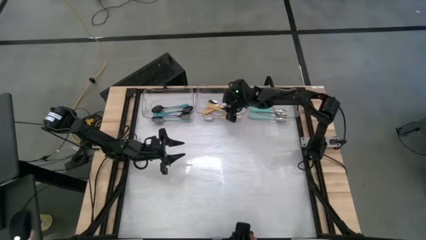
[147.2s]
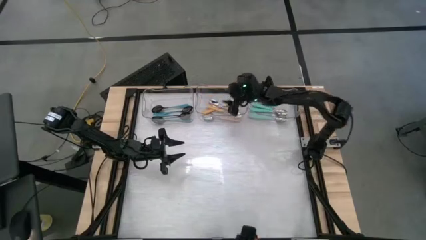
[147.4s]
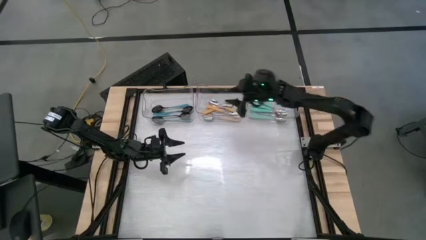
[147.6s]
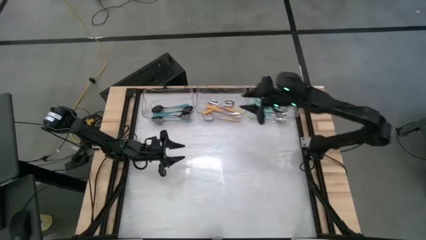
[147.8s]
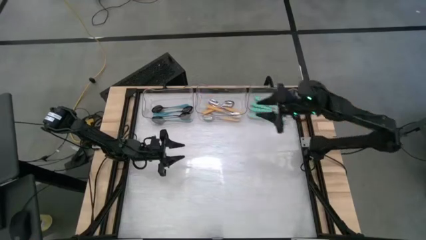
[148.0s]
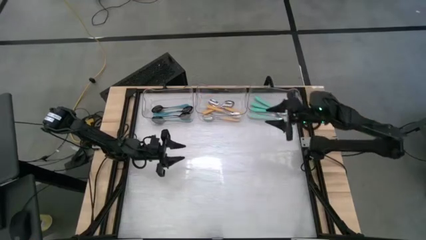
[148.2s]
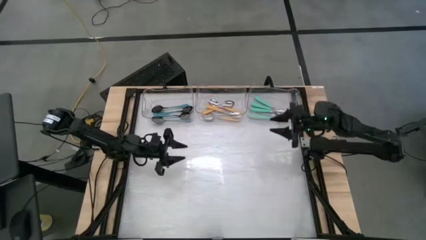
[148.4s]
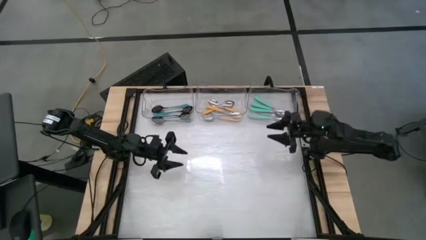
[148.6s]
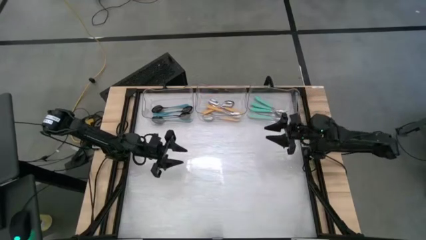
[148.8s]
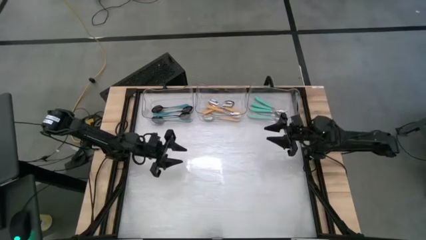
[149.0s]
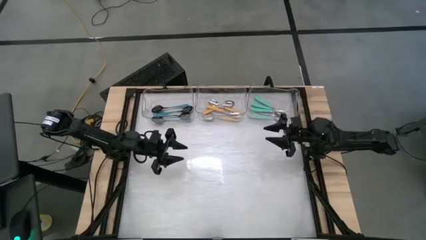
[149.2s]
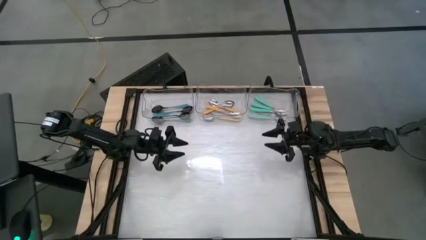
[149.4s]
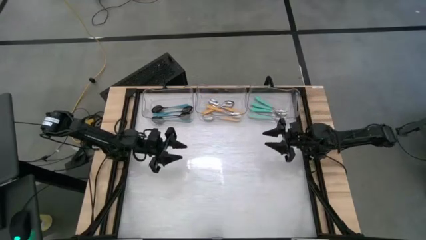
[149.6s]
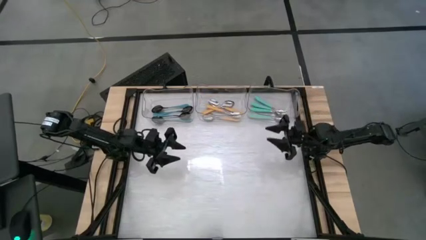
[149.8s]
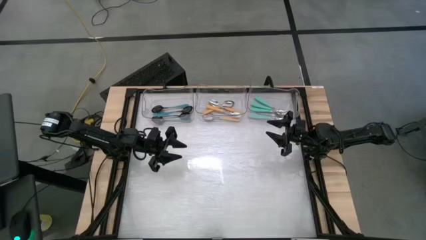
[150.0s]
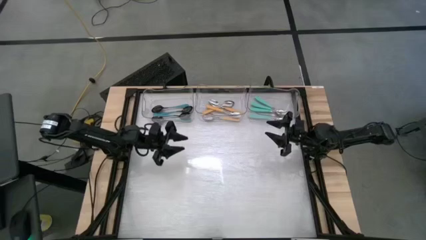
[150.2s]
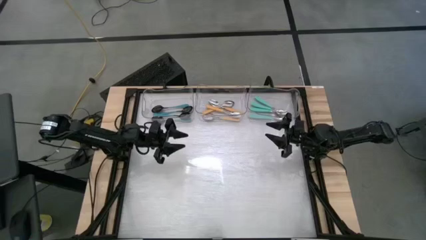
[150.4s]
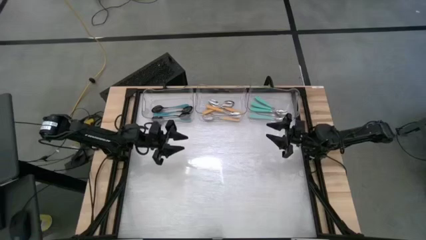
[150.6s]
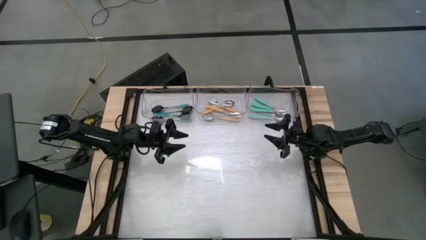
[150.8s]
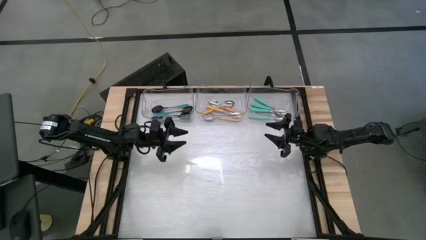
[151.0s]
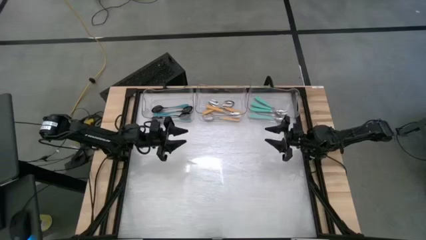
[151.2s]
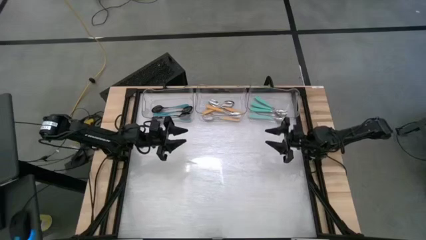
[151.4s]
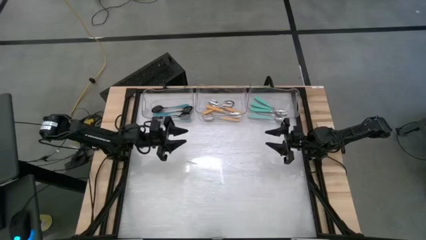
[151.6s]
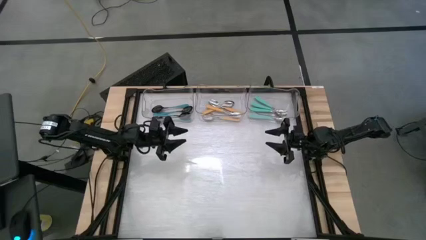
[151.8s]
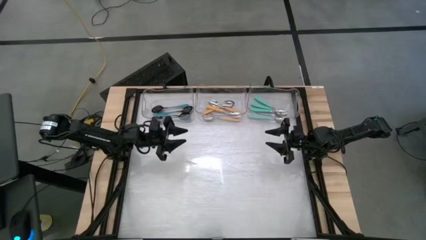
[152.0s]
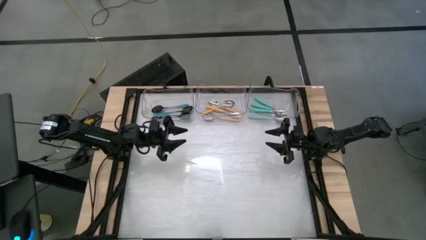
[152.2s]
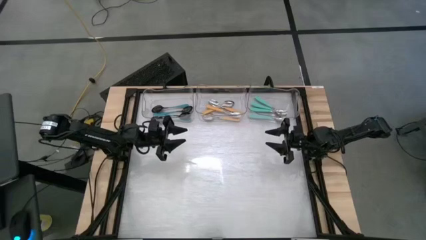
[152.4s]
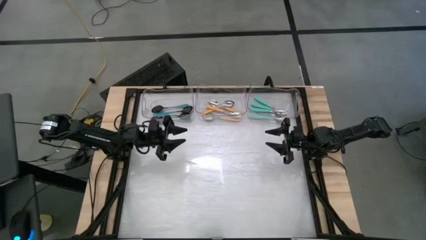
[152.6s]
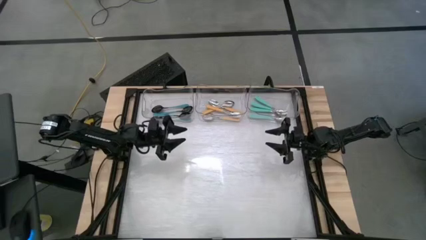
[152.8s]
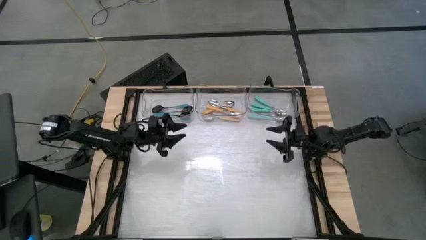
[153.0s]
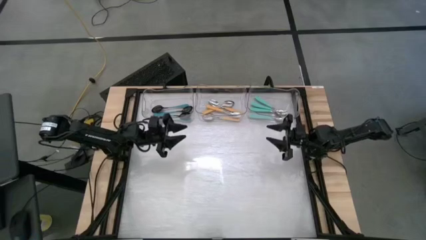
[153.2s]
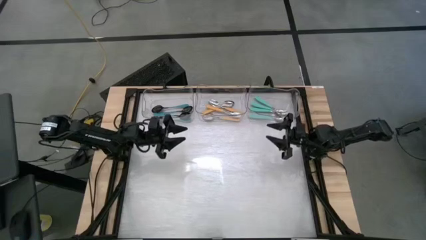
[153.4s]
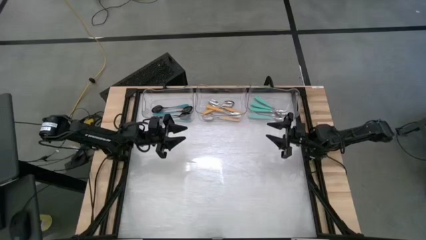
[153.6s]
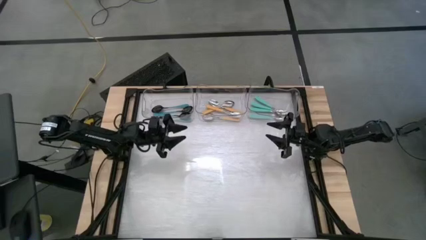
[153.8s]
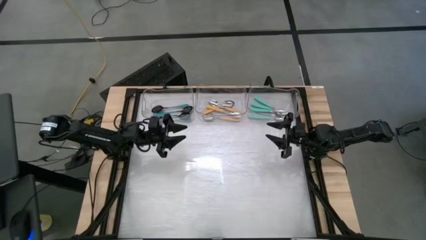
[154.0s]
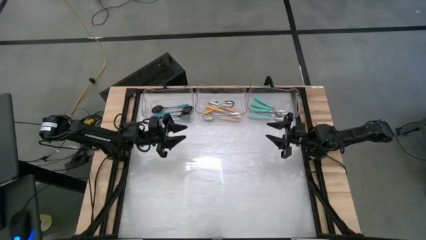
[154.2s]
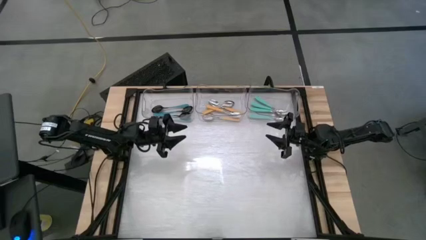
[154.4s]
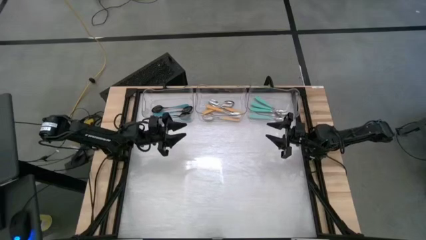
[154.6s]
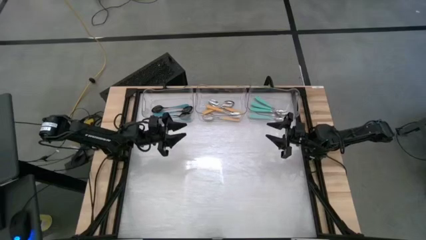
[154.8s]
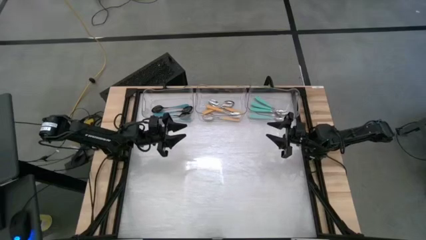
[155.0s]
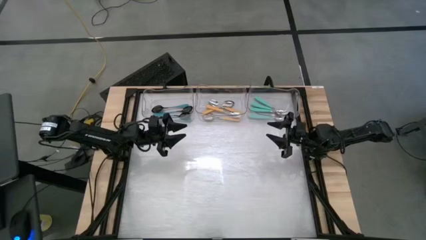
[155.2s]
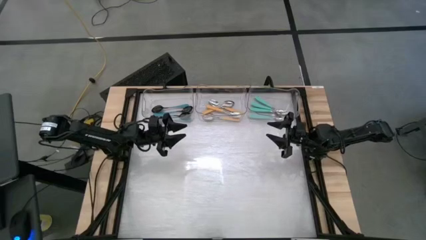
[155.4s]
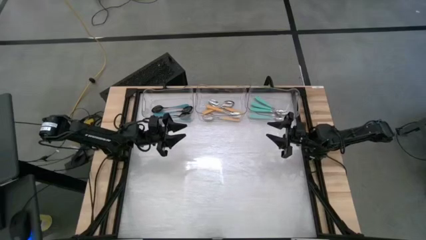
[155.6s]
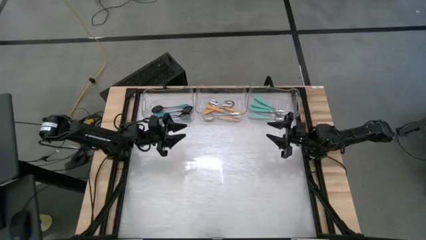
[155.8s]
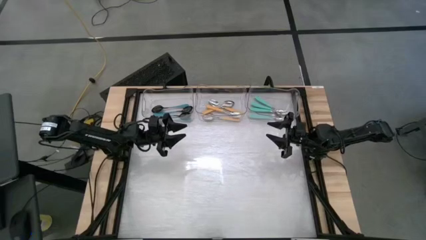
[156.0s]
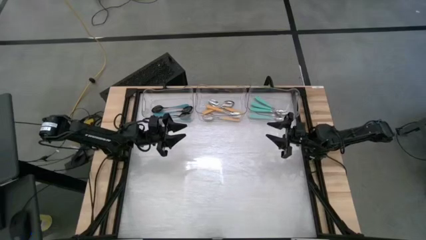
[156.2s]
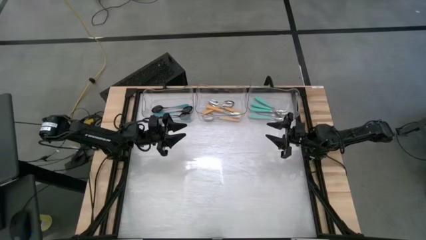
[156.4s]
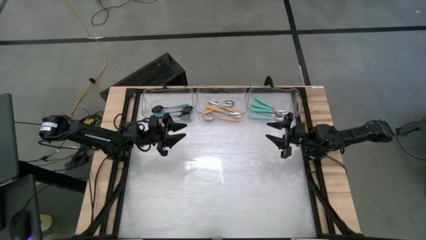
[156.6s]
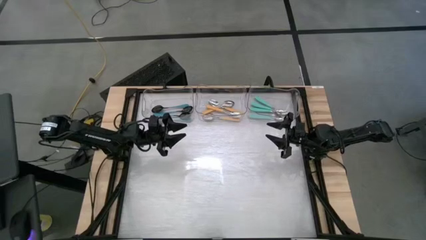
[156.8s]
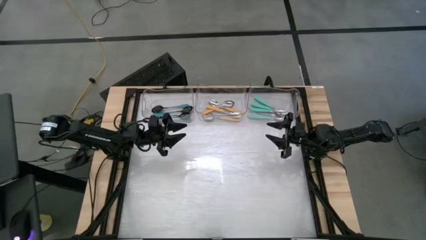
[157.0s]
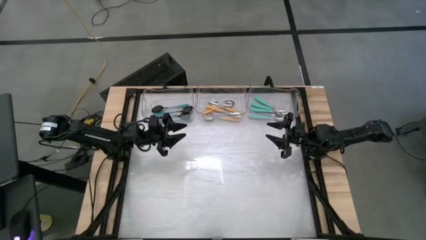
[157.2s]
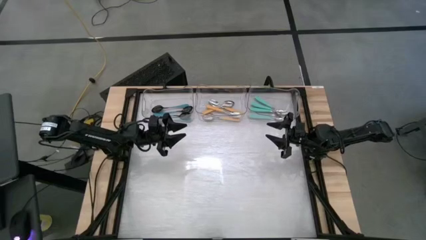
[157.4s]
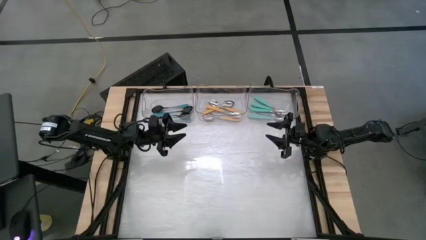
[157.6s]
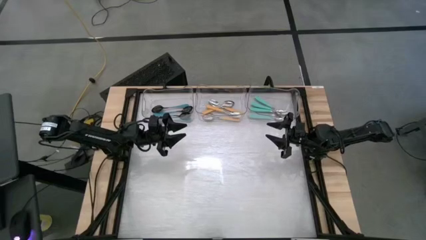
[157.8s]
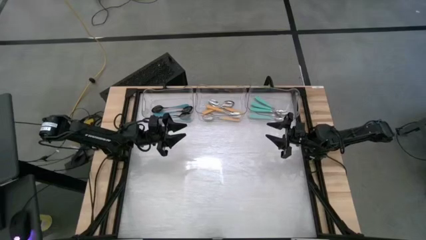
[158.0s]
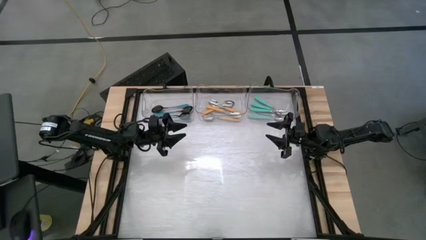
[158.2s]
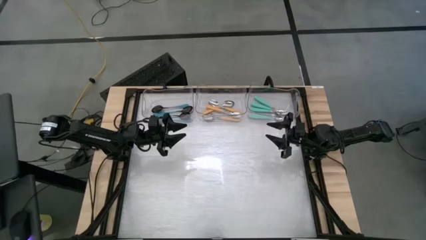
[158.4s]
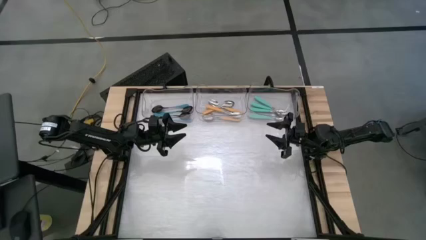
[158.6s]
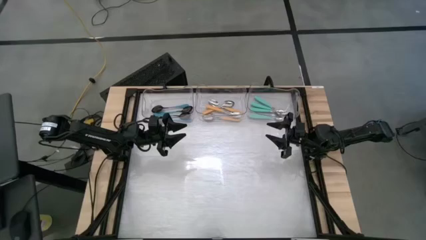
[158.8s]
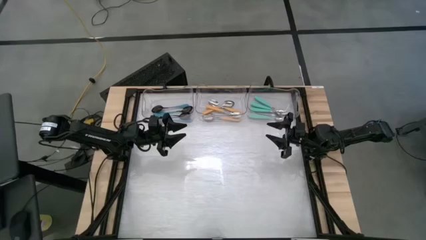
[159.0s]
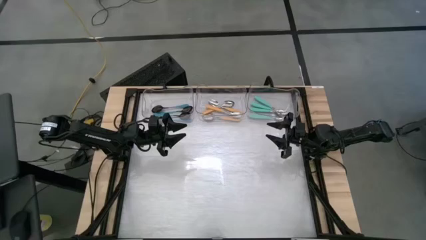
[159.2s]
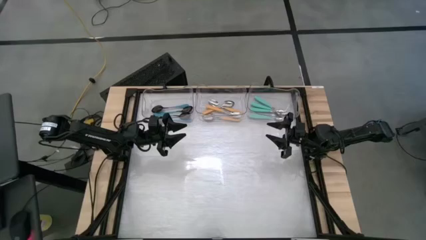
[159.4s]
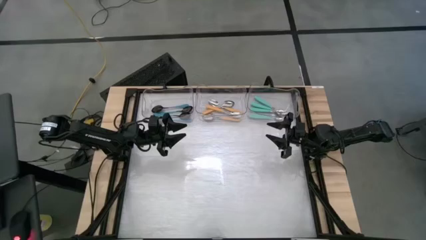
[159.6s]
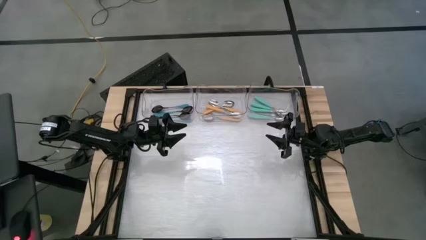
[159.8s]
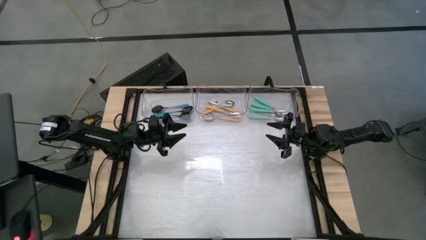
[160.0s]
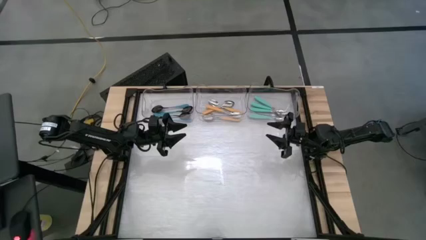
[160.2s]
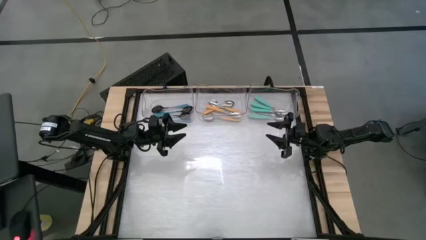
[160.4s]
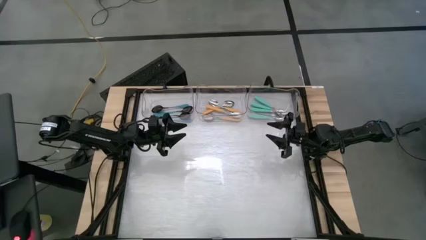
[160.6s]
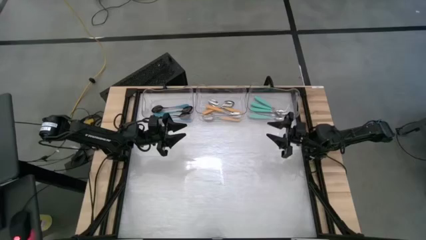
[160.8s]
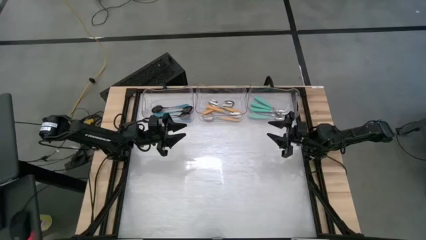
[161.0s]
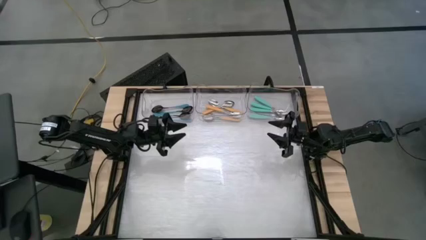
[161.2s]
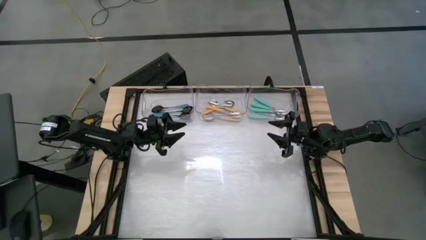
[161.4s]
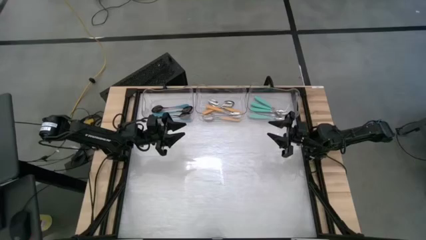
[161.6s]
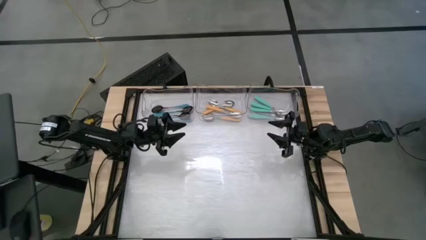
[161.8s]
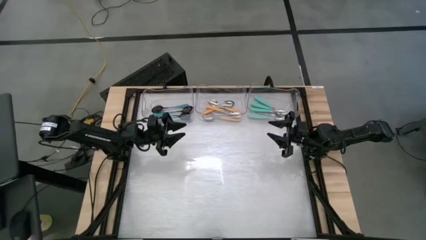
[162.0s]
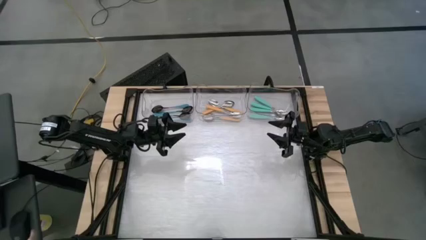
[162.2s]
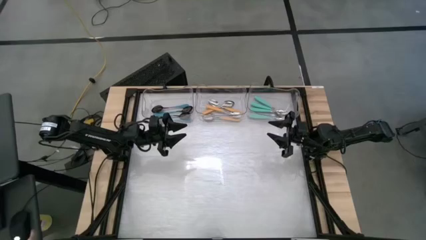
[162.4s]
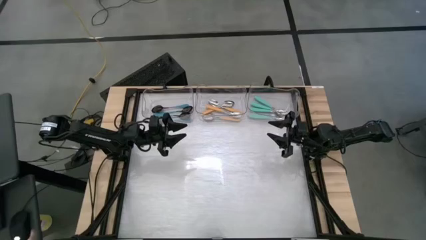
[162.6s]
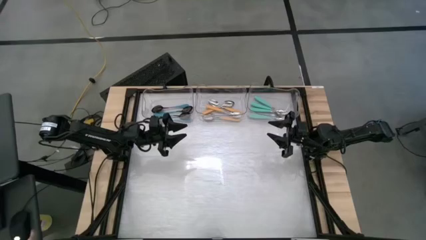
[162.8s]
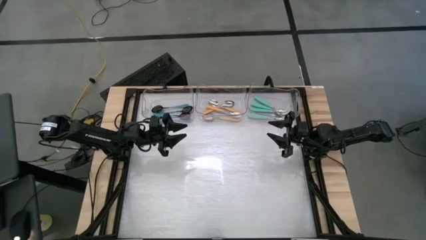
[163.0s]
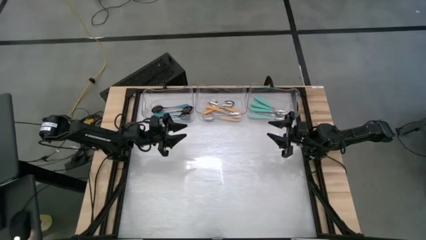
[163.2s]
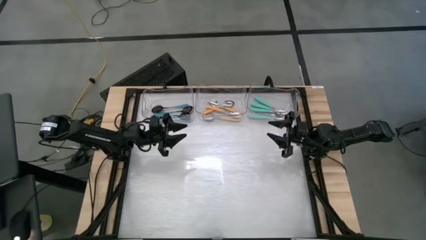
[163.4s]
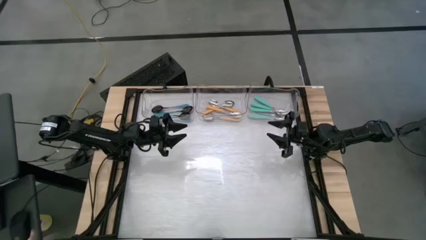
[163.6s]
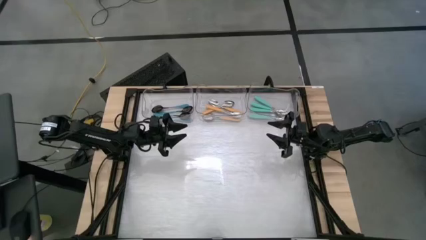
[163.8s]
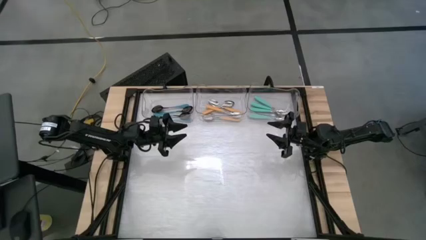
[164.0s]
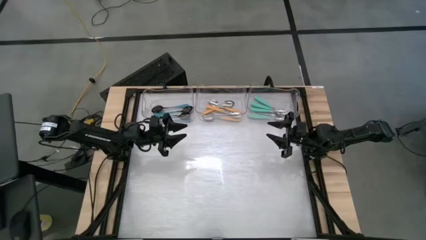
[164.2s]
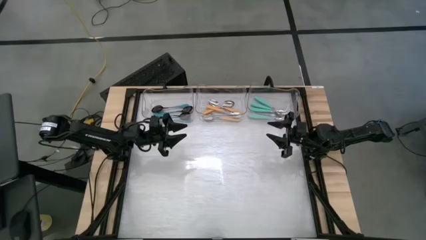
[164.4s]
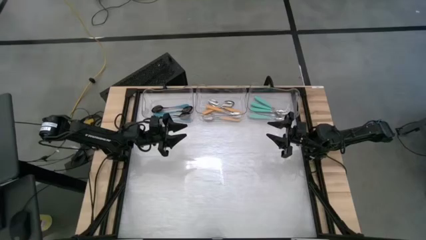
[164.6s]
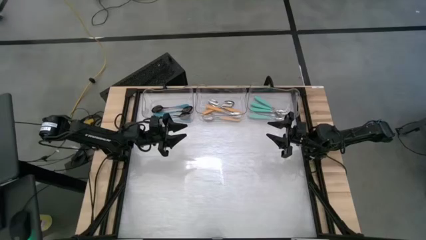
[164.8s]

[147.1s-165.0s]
Task: Sort silverware by color (type)
Return to Home Position
